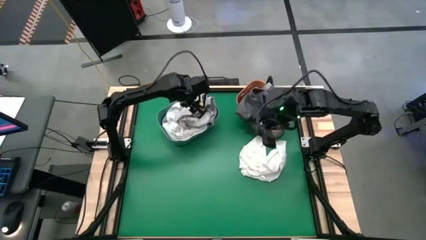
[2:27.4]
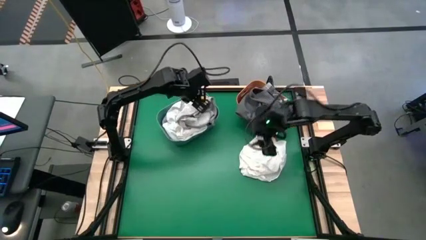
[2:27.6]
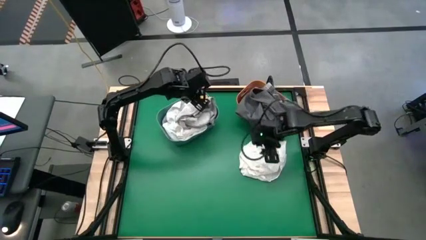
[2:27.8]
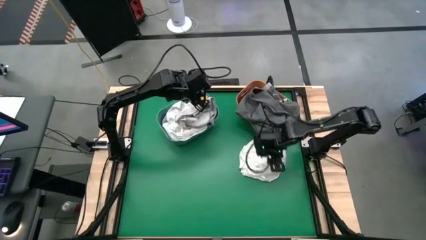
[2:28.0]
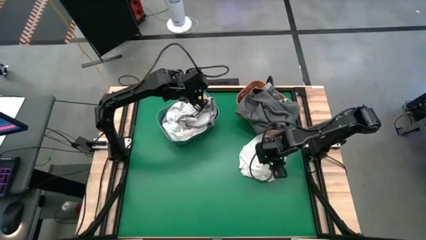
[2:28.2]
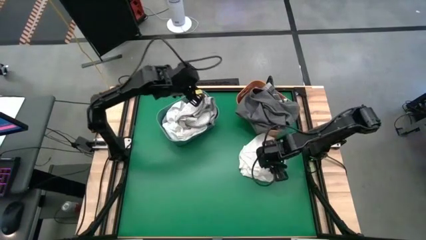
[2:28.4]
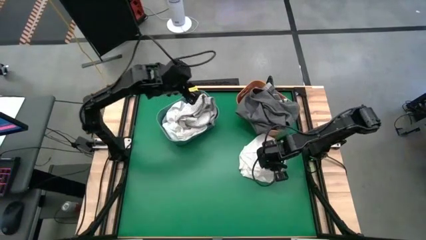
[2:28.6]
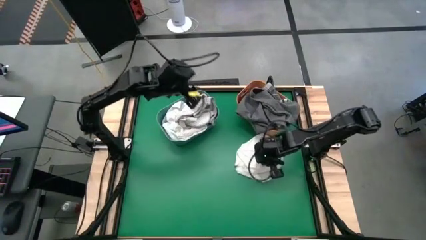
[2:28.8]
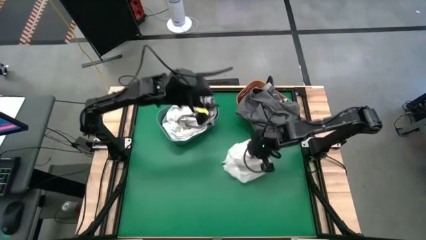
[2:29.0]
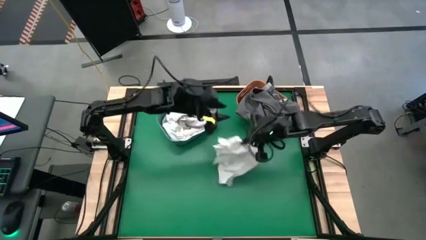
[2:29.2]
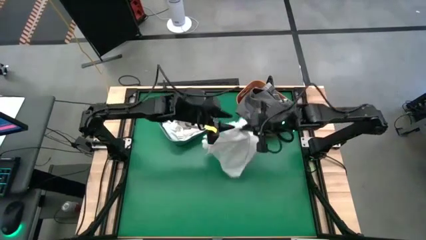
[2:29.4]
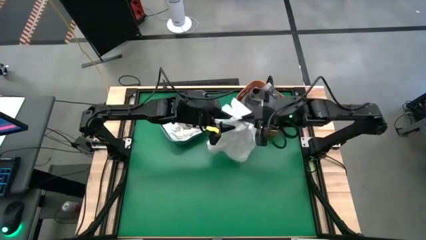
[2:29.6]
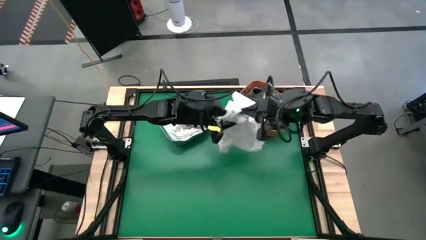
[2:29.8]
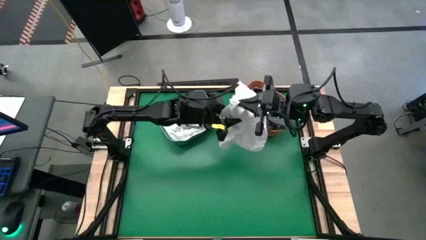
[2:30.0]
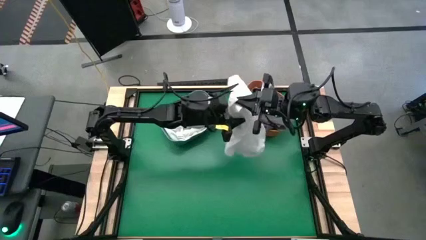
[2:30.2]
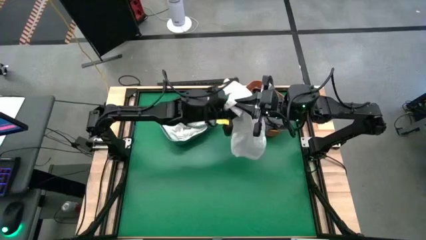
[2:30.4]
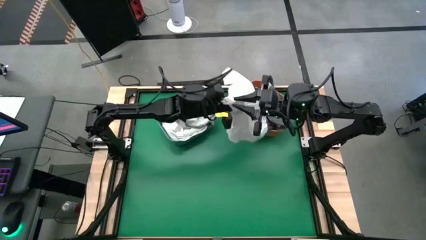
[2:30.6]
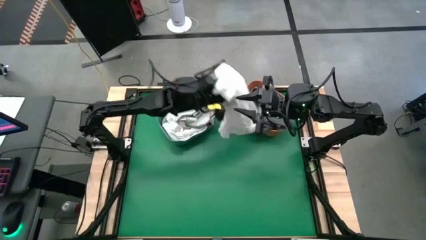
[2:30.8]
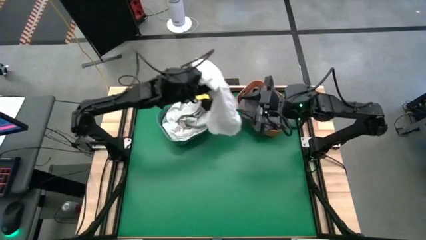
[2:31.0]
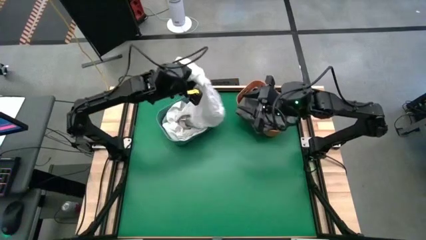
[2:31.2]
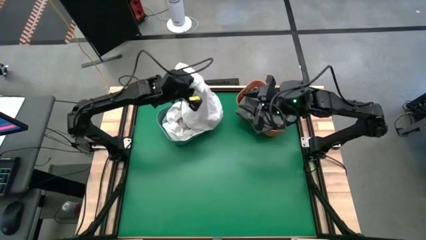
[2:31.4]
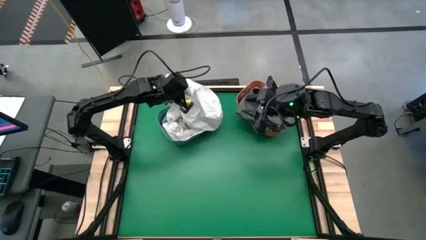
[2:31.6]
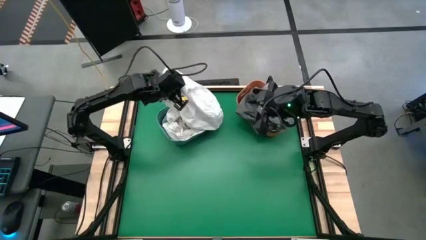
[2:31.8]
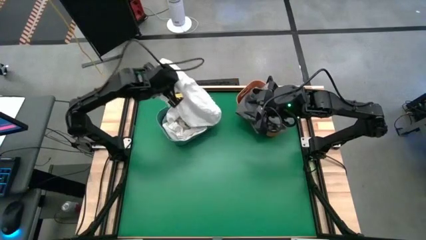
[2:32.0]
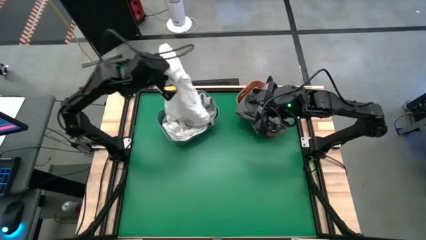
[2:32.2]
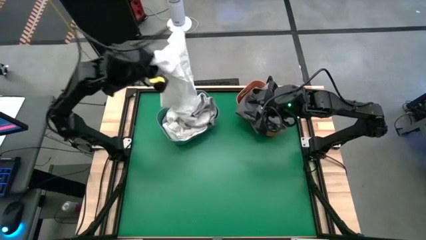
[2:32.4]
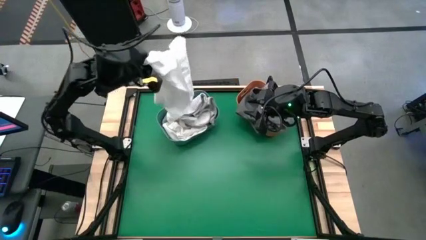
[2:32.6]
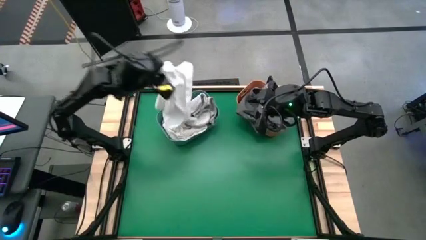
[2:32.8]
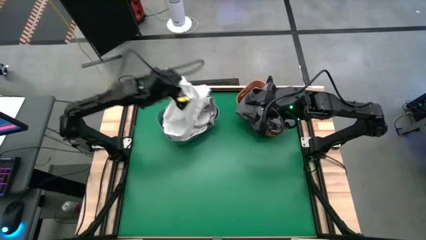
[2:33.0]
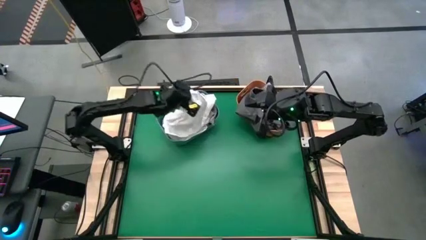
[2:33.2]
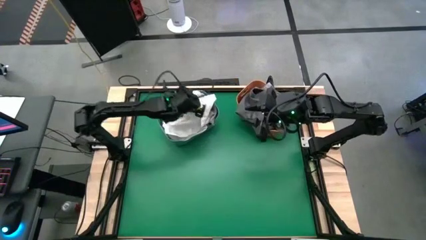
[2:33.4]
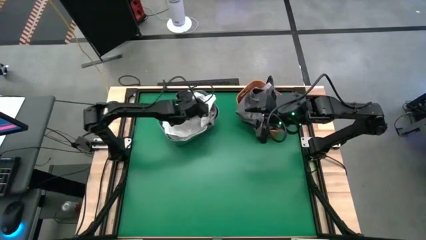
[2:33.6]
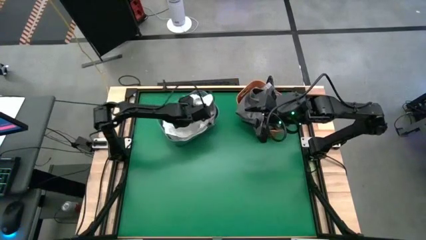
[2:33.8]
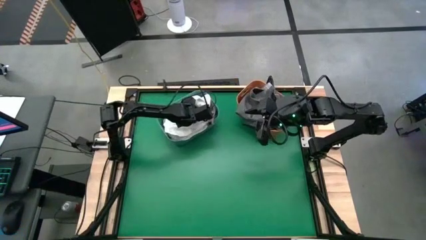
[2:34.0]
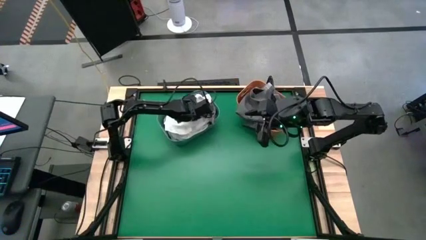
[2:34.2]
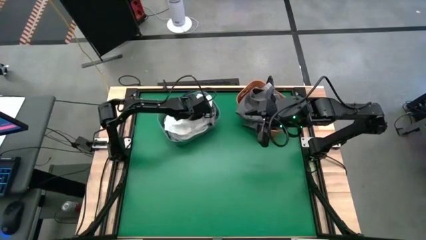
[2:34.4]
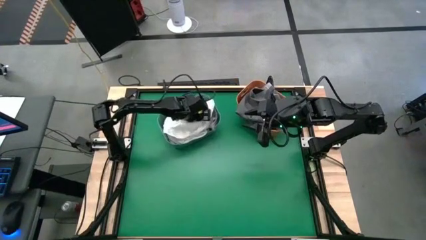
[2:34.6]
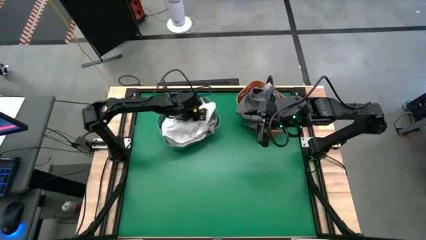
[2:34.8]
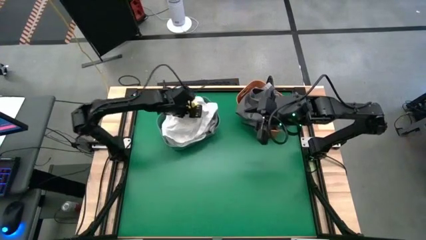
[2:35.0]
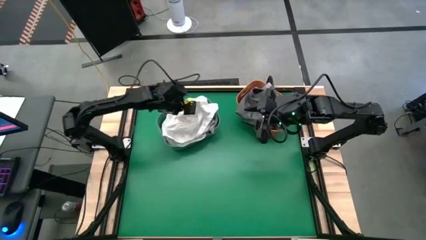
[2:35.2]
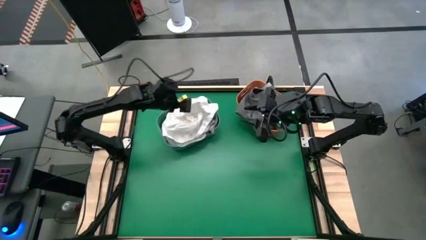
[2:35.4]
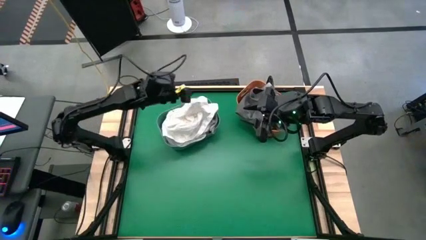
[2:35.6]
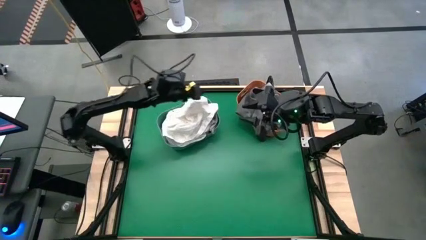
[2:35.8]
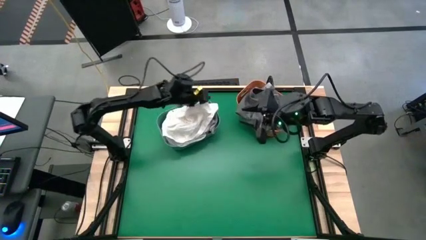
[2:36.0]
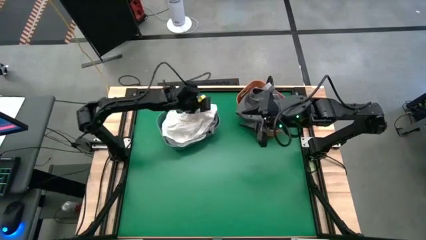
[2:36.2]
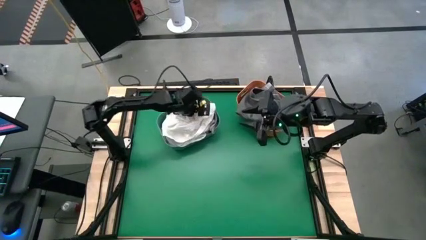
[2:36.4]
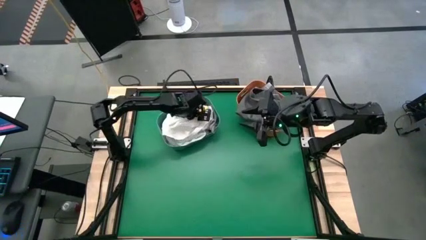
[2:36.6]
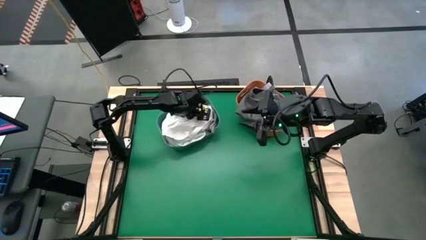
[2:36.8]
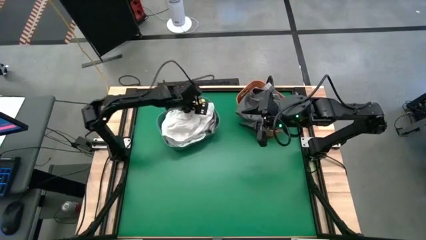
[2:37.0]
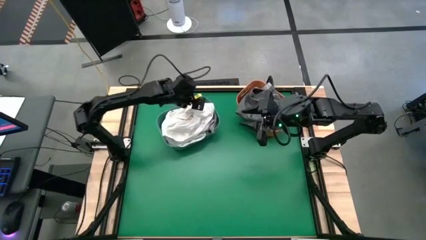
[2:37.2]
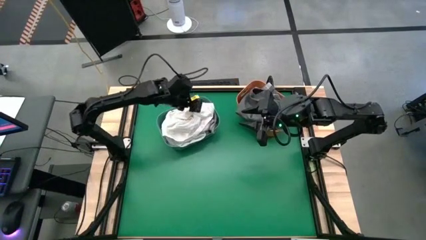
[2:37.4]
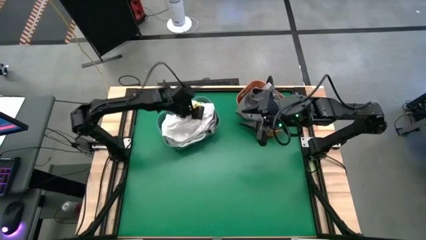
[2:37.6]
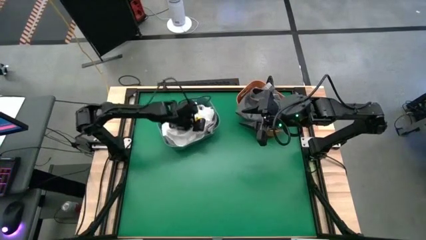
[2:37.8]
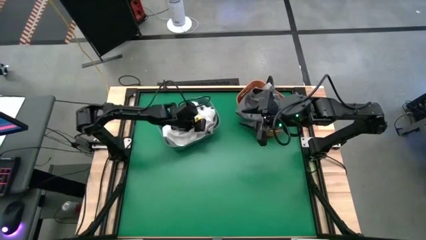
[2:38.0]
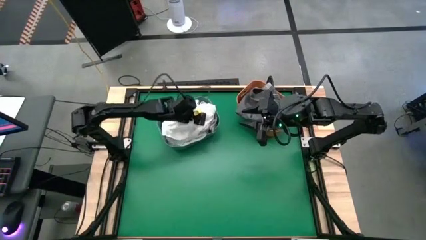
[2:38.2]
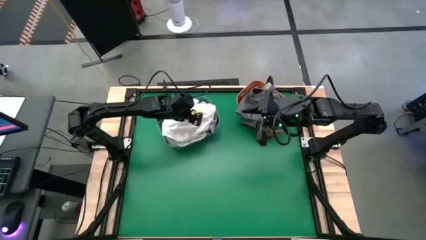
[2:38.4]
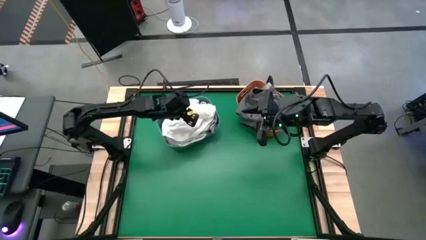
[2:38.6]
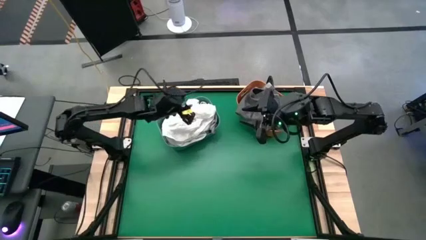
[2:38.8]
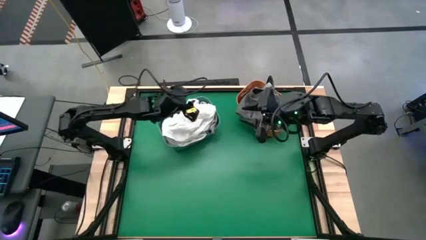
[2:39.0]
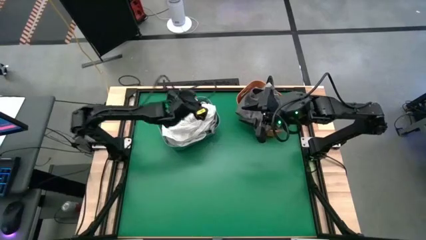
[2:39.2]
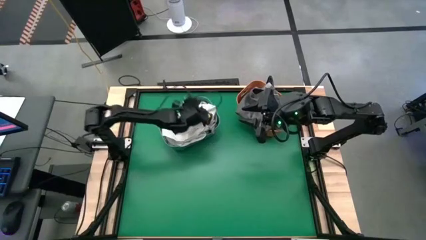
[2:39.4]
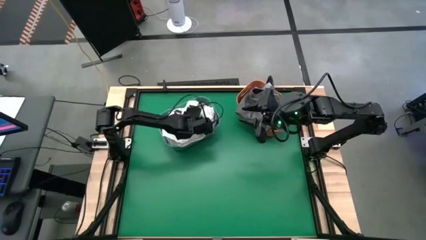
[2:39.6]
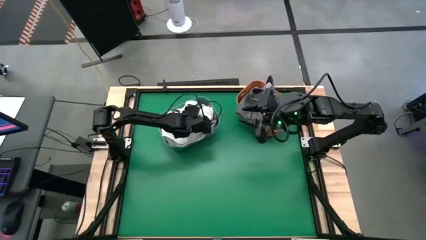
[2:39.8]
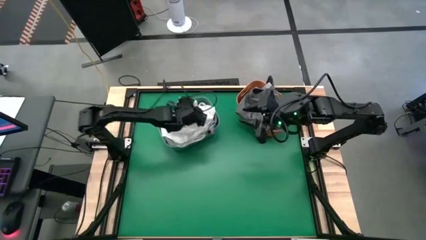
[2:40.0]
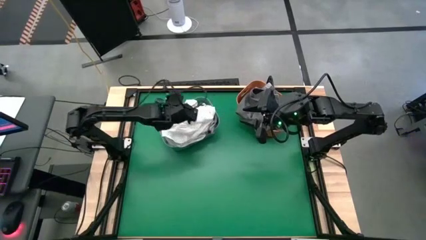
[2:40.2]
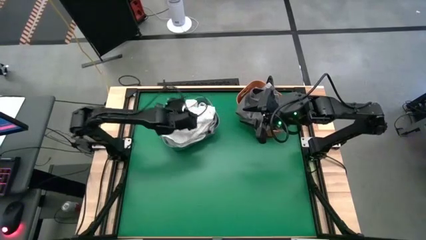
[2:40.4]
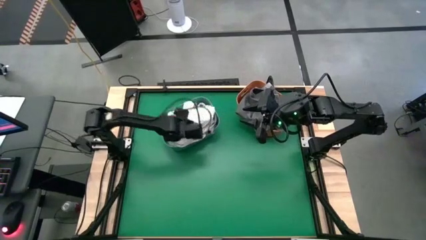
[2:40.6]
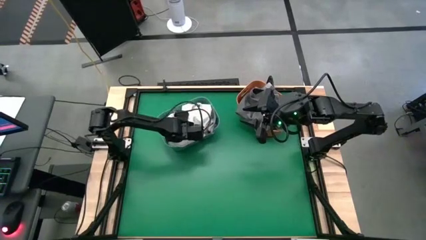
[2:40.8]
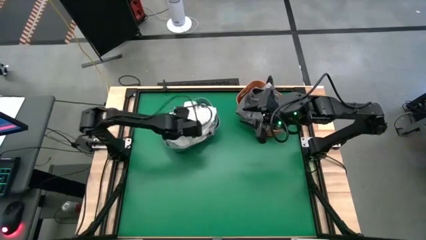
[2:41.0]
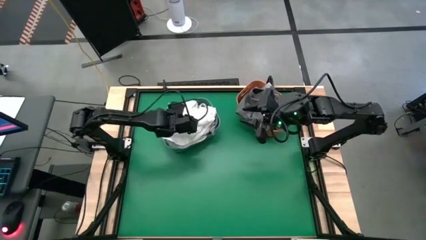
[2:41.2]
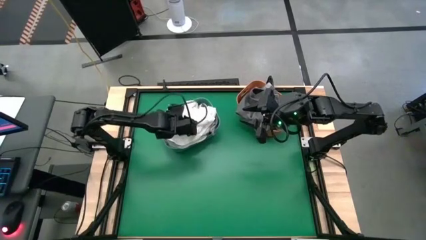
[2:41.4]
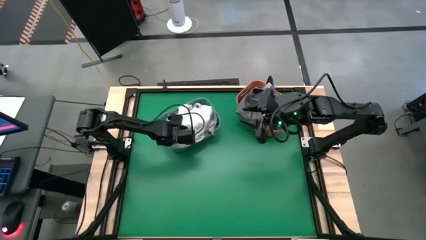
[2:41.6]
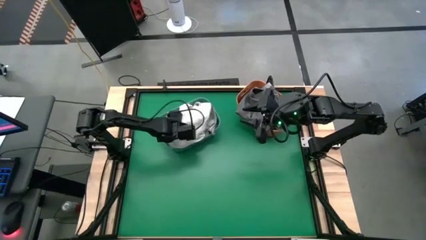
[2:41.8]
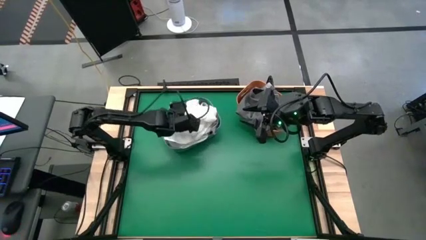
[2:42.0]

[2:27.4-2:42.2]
Task: Sort towels by color in basket
Put the white towel into the blue bin
